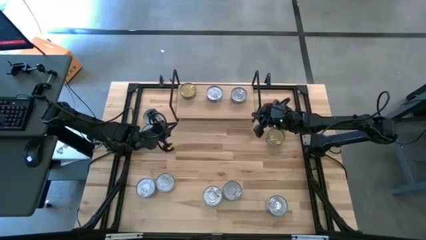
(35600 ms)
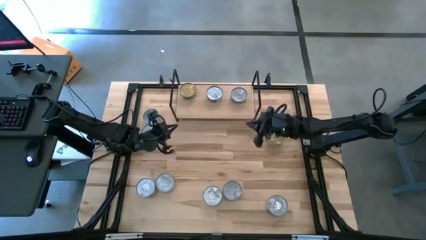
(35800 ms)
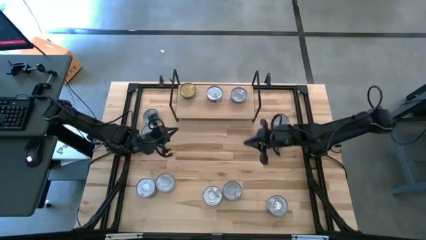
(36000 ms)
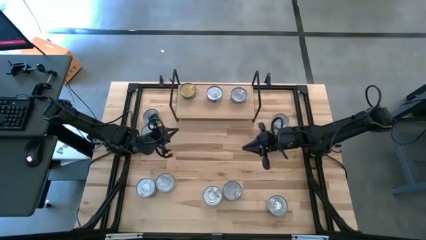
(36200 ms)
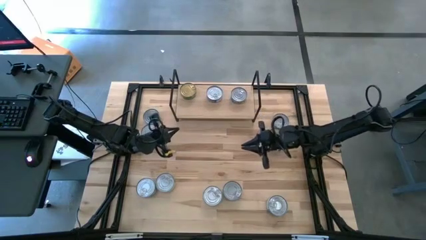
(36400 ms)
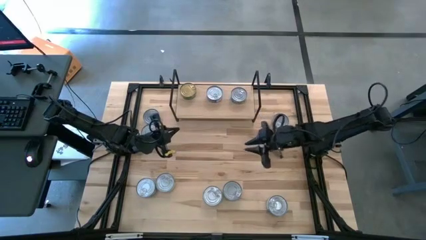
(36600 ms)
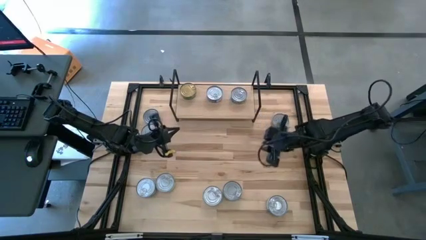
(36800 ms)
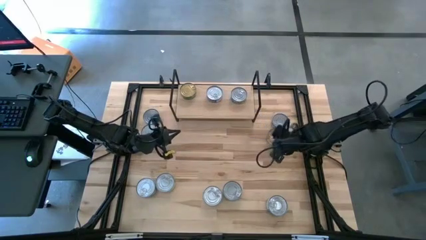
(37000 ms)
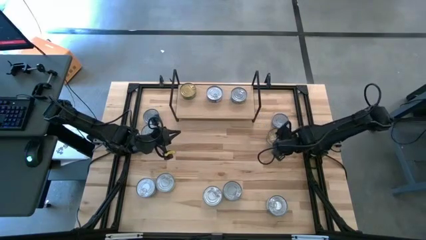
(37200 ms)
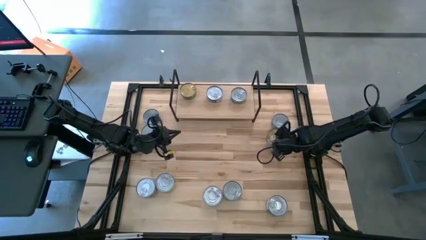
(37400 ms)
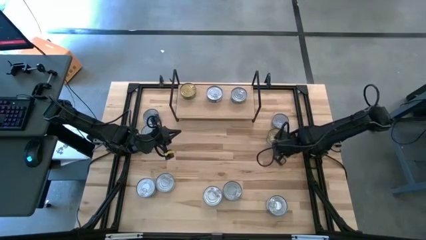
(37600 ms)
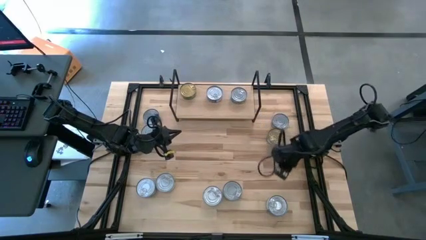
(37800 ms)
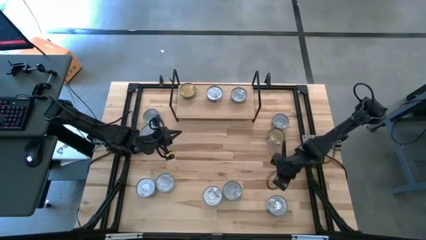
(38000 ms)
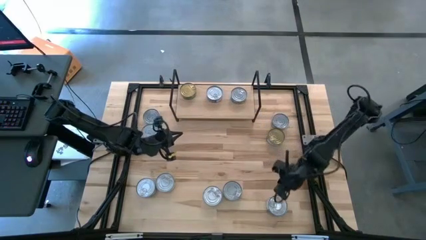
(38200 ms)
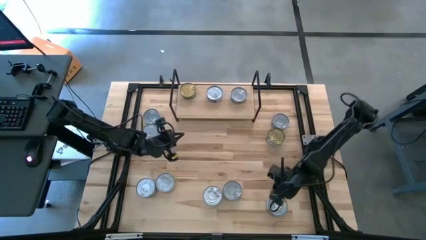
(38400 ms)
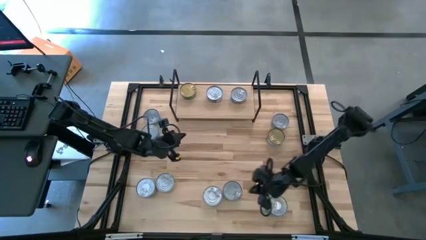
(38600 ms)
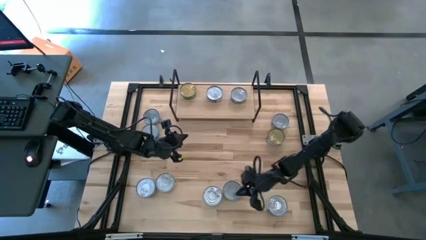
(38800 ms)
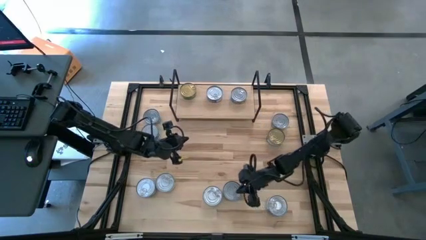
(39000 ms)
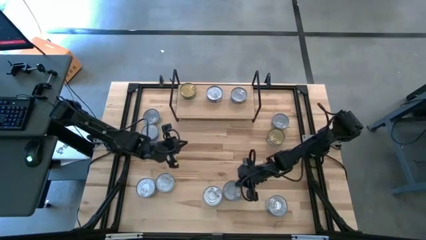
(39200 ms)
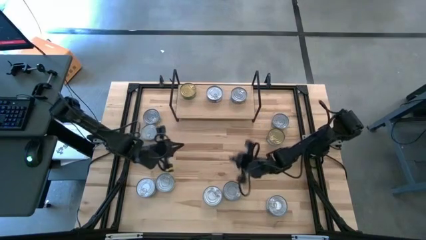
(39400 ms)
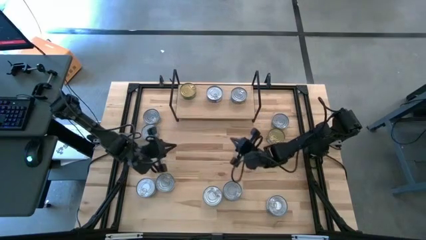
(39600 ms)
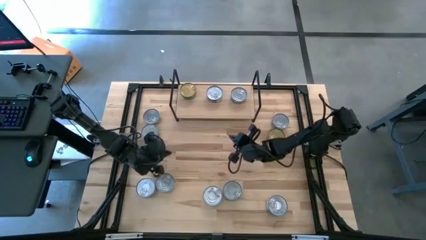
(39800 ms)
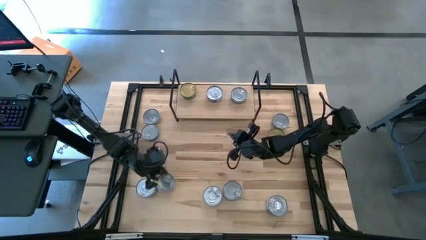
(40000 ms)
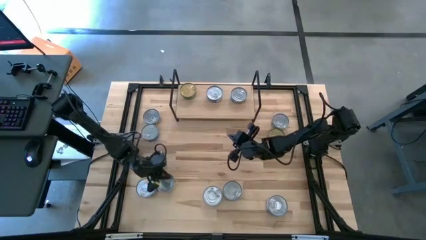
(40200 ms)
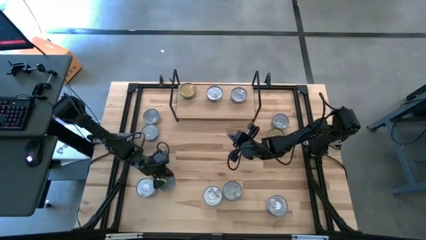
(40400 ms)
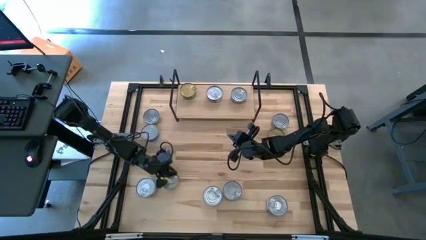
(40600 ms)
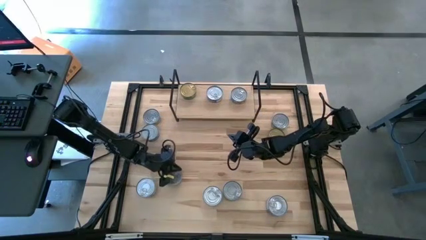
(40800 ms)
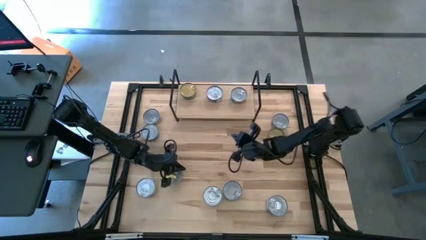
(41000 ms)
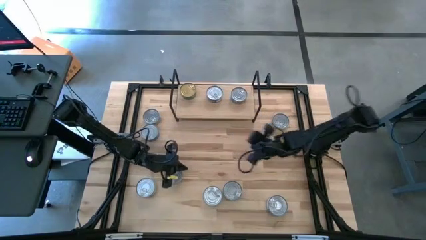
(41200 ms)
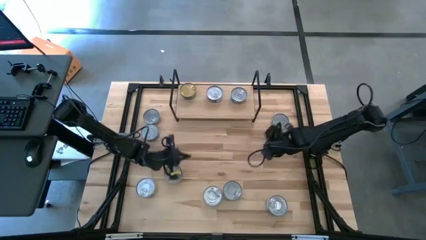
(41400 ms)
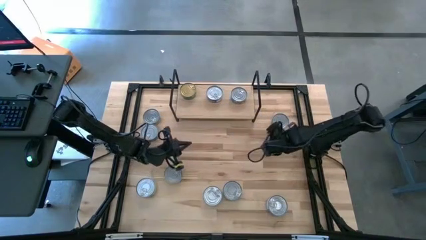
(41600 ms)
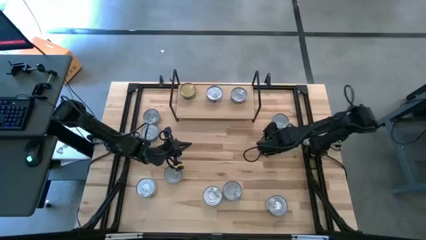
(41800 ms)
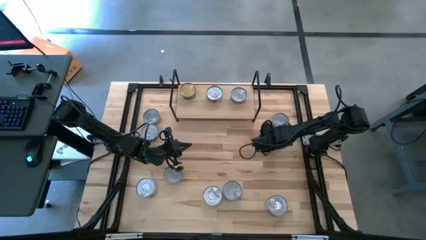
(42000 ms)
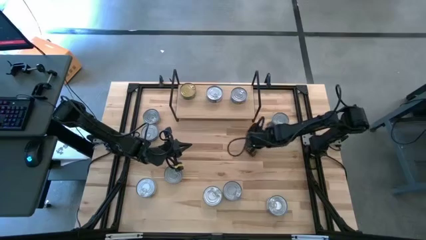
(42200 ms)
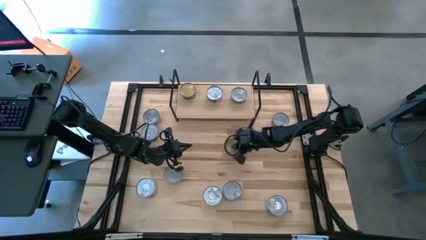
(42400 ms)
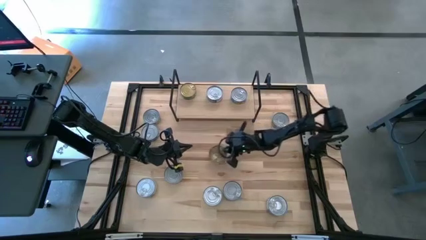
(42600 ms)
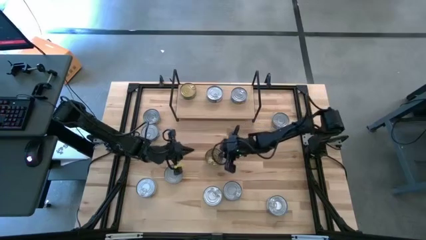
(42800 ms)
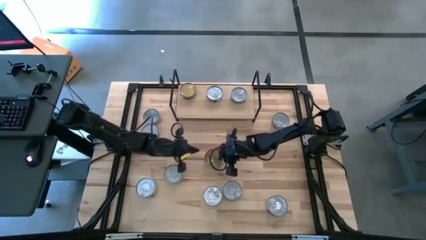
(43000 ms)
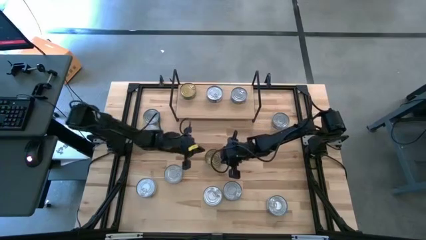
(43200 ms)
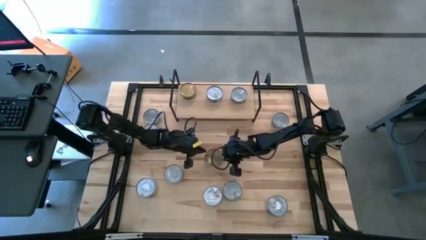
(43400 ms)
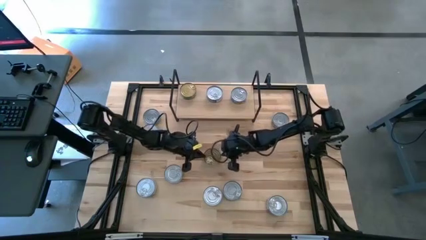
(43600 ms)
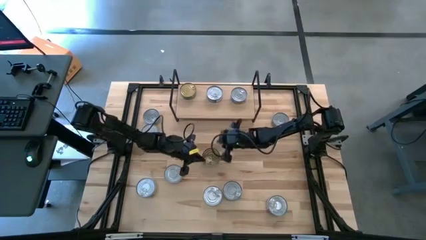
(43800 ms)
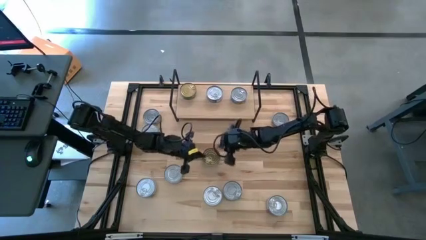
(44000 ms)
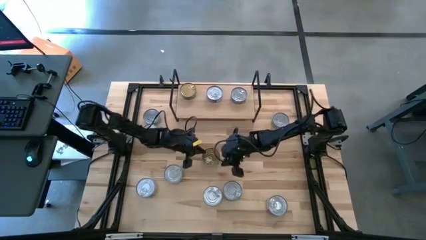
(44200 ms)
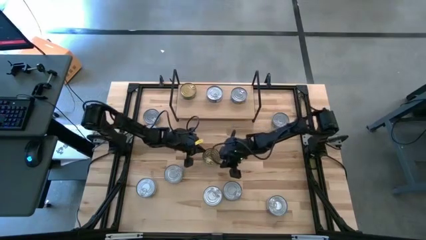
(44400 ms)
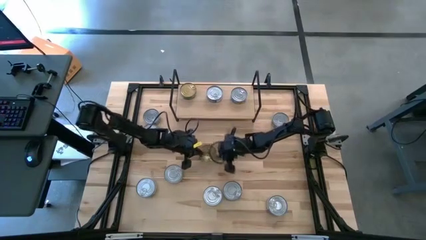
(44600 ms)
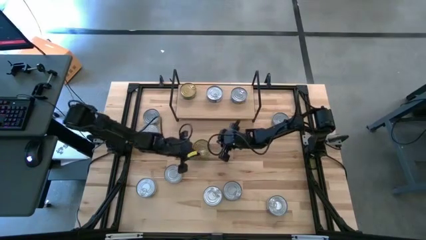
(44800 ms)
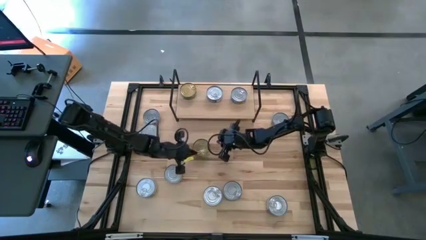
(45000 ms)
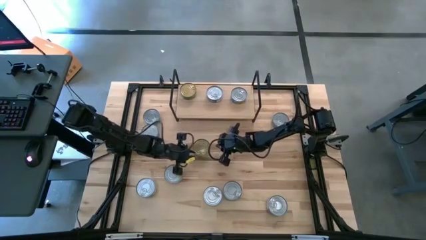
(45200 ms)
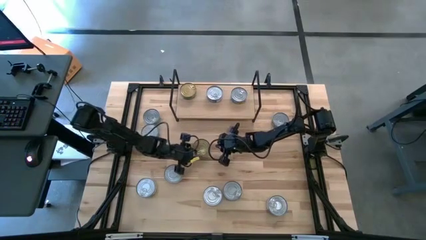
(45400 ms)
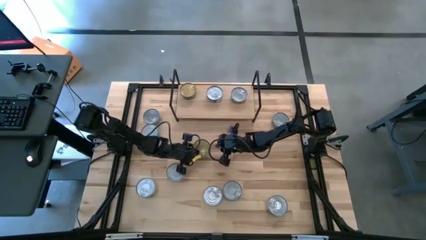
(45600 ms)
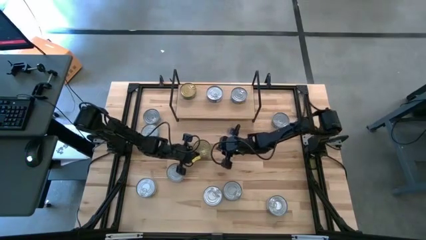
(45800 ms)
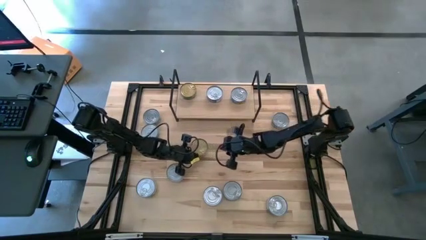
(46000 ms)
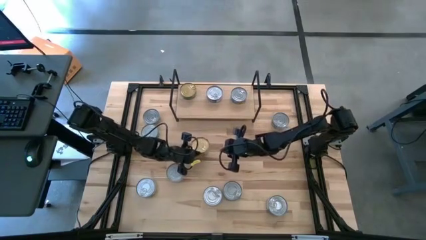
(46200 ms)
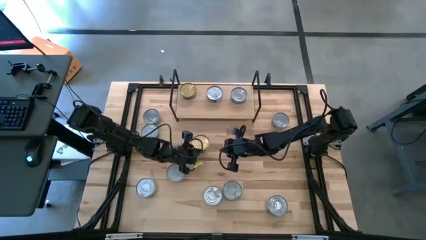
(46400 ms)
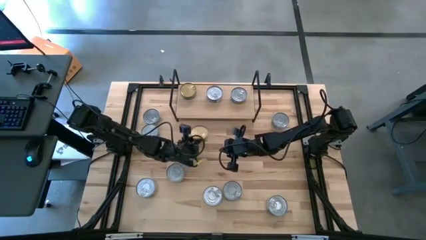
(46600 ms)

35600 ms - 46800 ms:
Task: Stack canned seafood by type on shelf
Put the green tuna can on the shelf

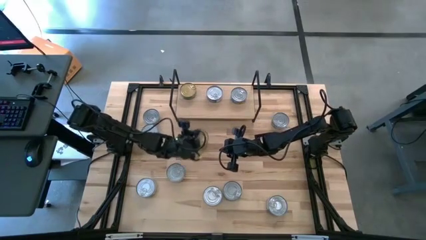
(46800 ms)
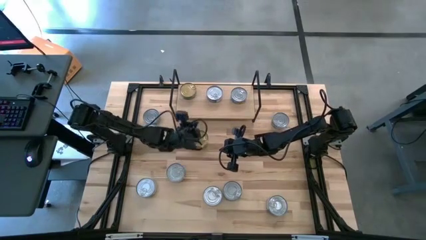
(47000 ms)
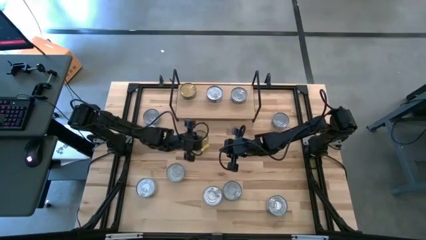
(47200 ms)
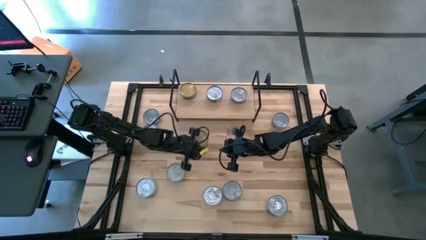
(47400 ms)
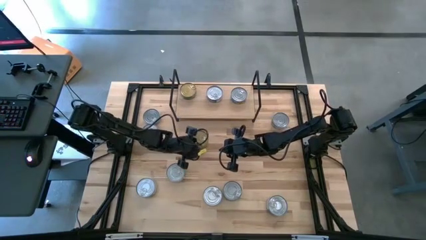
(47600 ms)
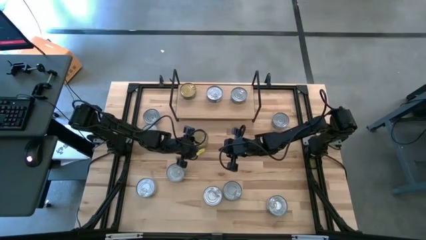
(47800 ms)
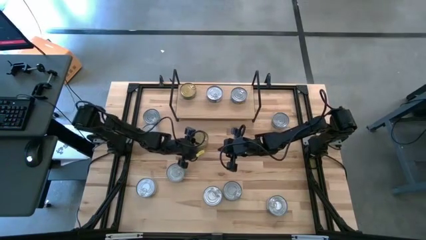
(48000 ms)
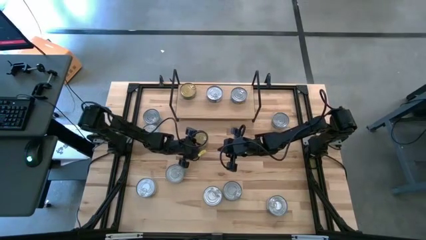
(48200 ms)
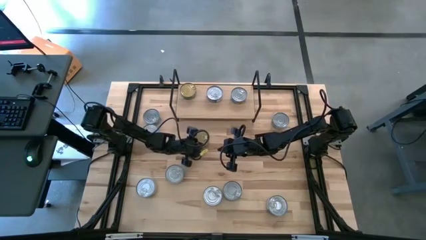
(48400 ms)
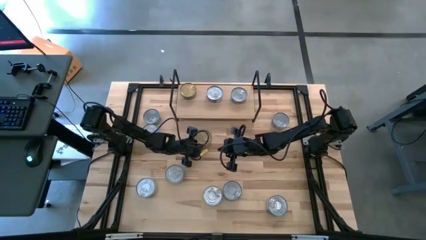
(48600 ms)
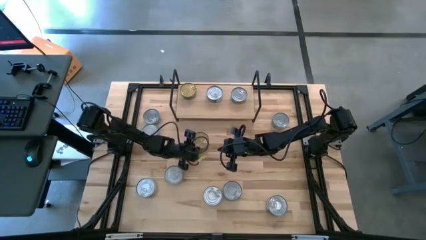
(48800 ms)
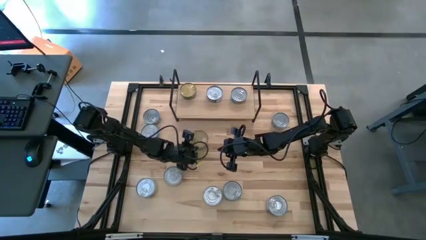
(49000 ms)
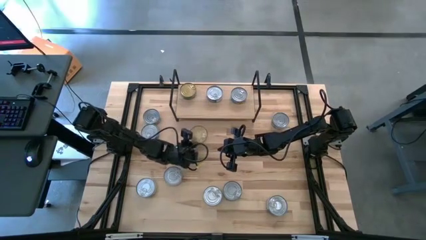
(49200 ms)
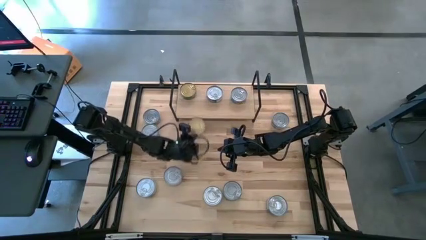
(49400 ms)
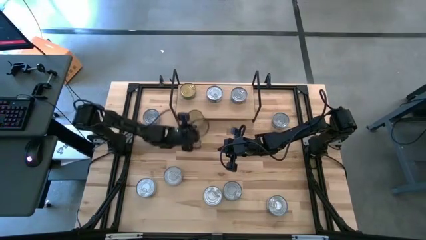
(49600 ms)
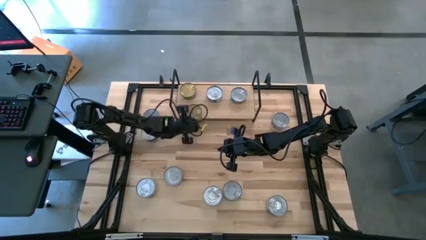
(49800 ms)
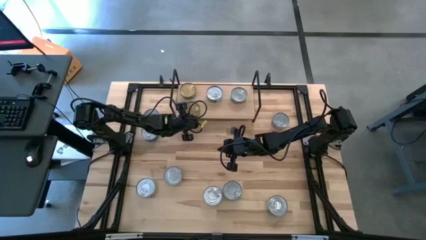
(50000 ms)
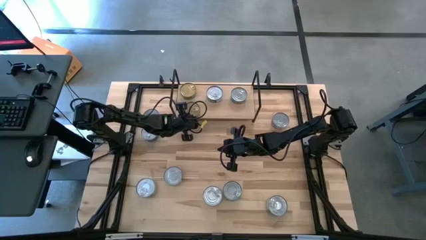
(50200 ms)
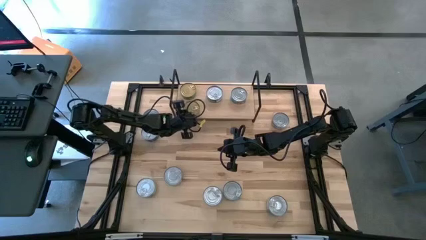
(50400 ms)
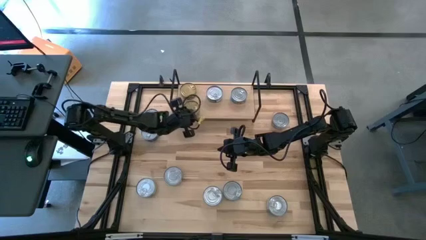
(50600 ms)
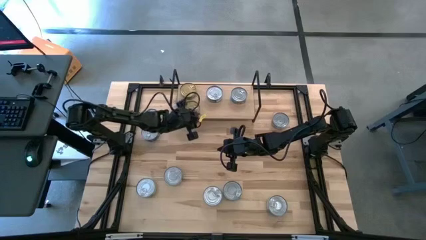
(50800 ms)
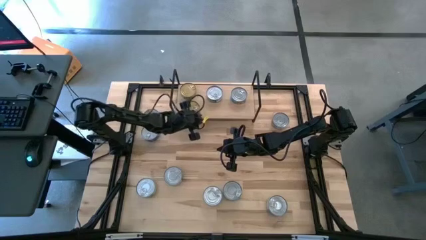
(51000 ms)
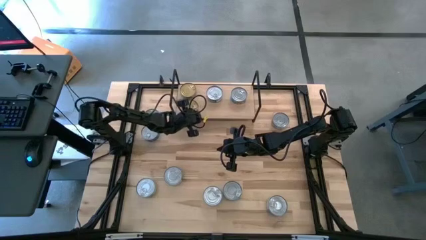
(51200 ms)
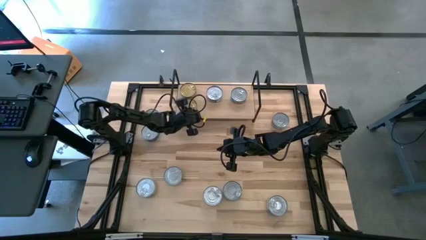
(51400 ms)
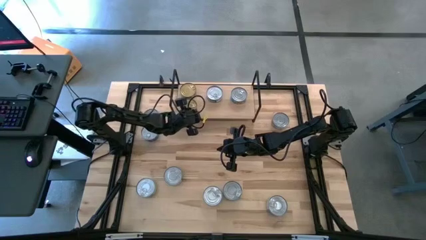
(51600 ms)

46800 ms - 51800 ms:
Put the green tuna can on the shelf

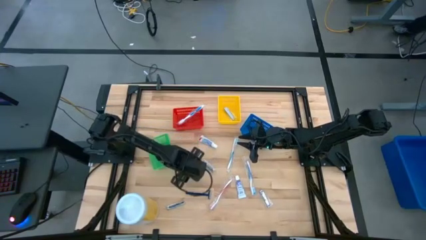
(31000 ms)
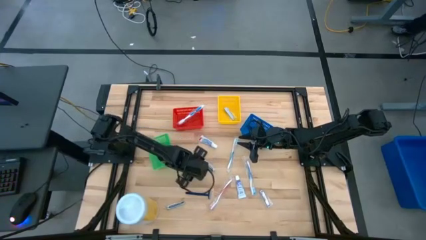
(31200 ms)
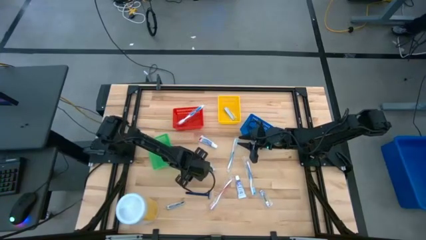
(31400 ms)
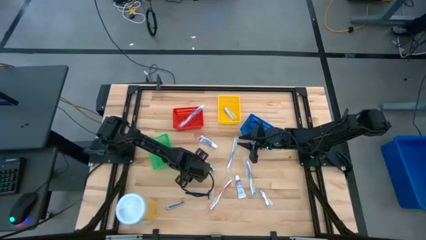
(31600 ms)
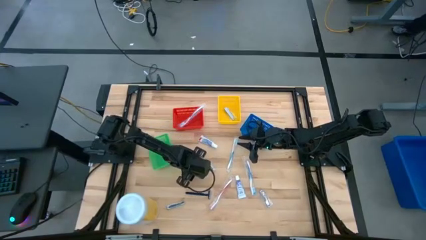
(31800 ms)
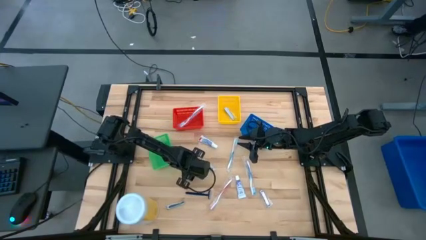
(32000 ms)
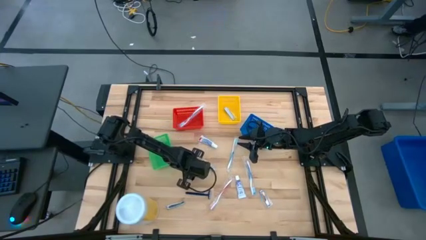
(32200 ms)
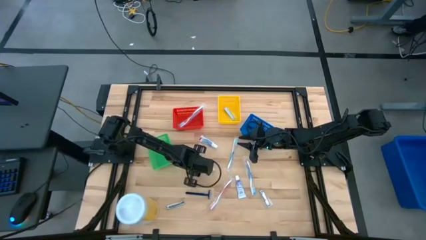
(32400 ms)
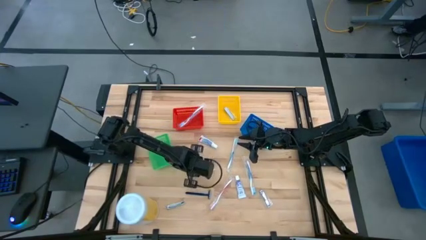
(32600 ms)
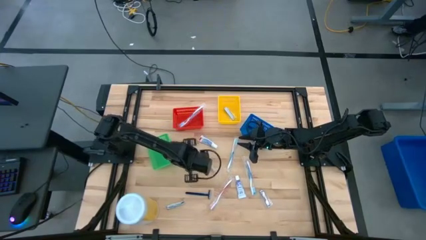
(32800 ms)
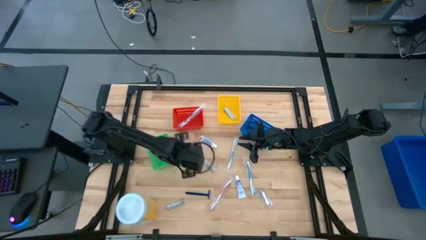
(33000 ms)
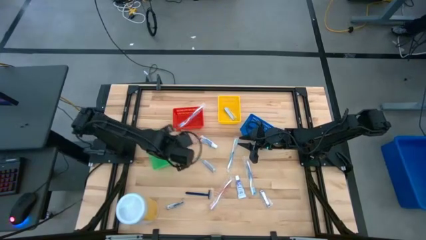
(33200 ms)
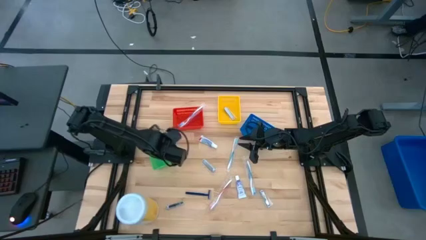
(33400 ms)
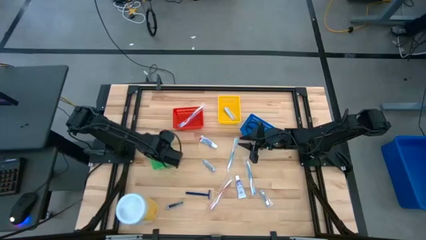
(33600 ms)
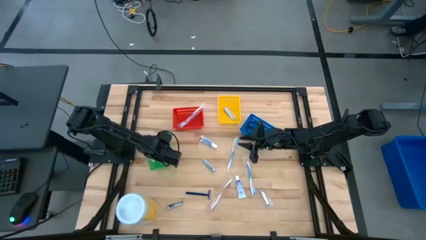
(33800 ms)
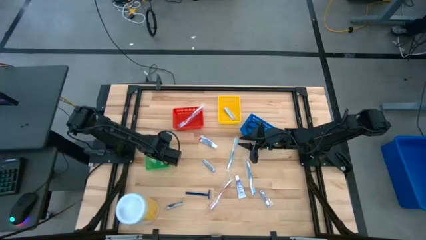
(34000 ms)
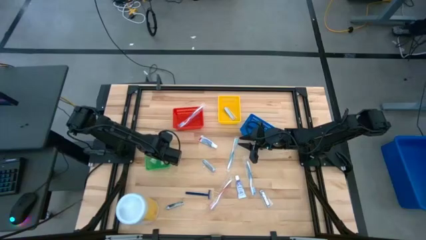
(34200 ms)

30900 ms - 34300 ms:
Task: Pick & Place Travel size toiletries
Put the white toothpaste into the green bin
